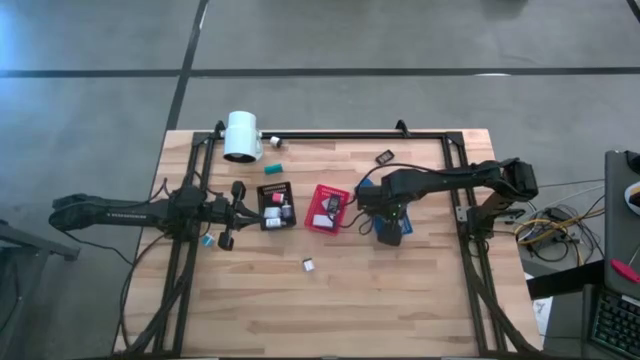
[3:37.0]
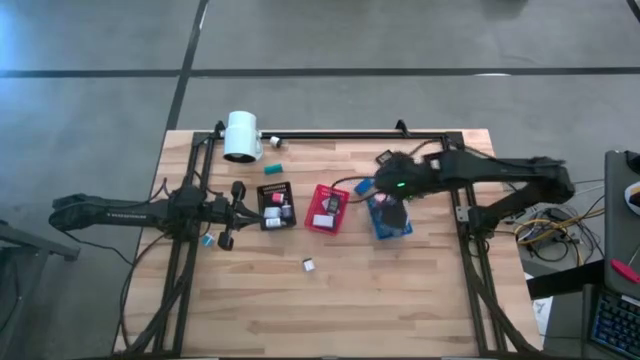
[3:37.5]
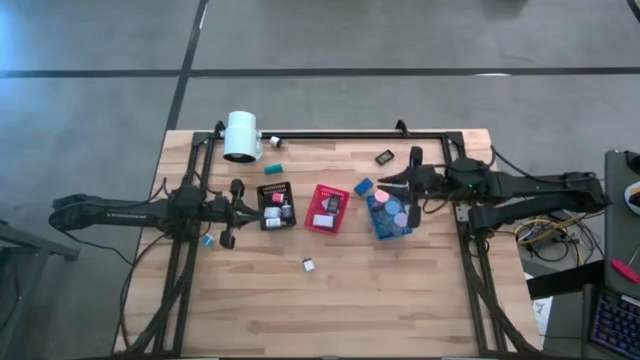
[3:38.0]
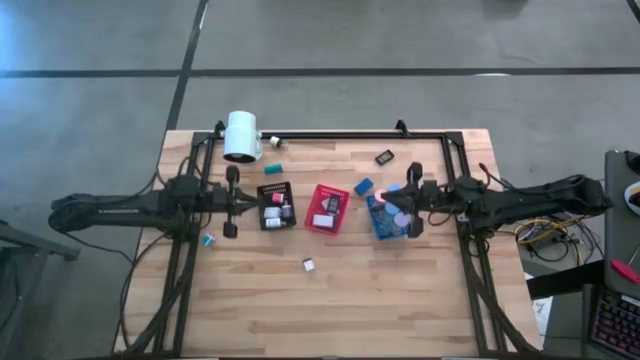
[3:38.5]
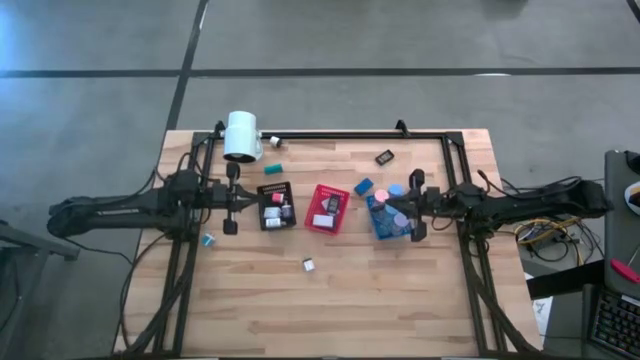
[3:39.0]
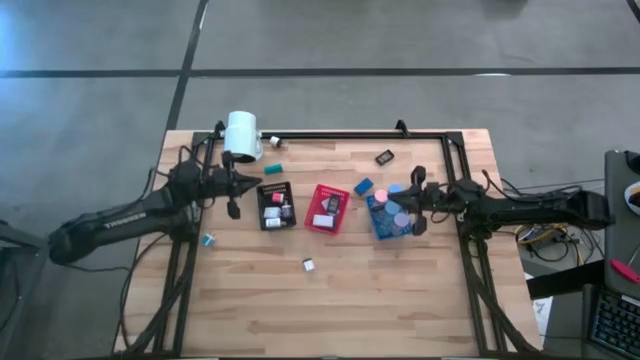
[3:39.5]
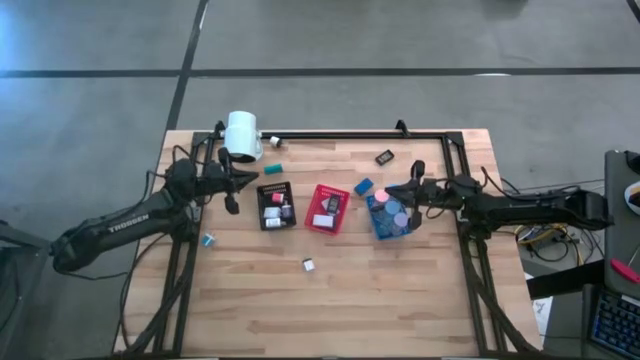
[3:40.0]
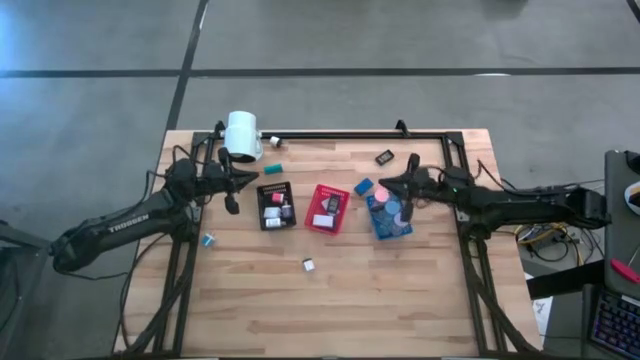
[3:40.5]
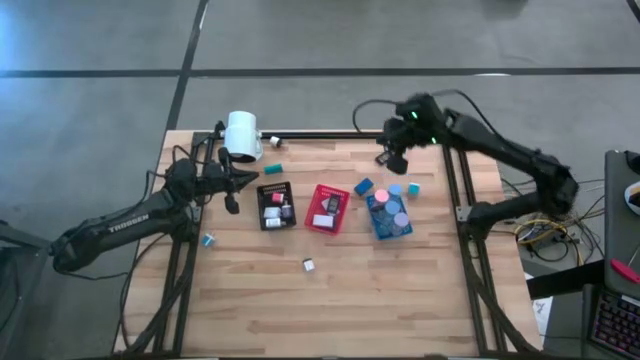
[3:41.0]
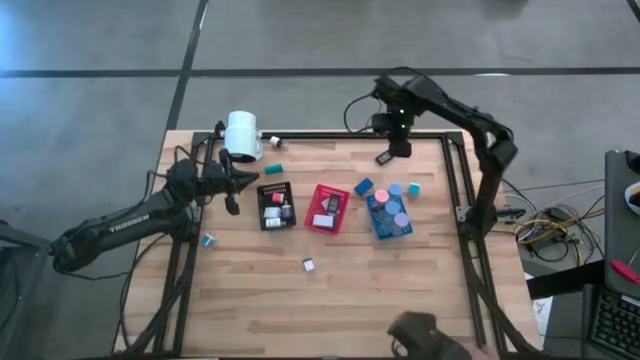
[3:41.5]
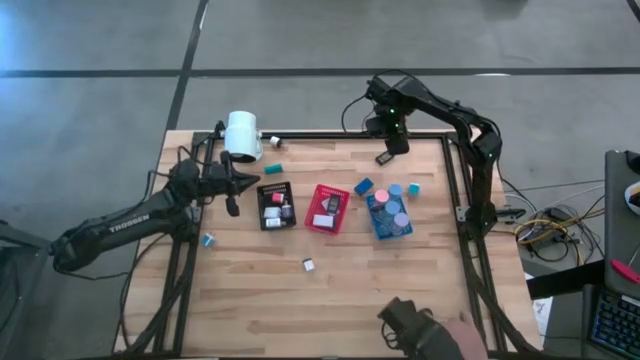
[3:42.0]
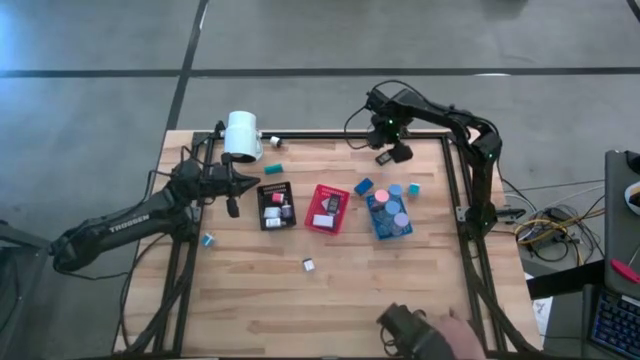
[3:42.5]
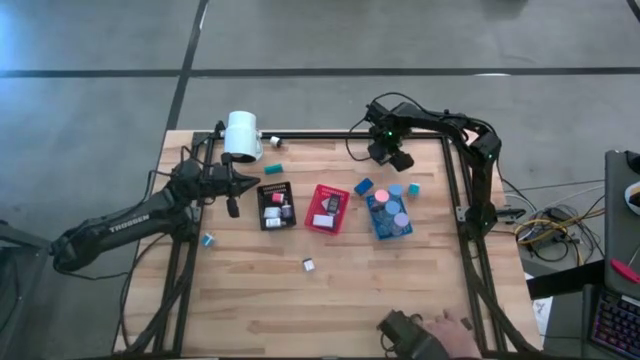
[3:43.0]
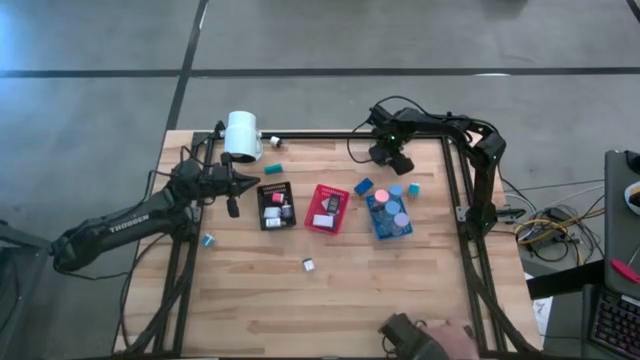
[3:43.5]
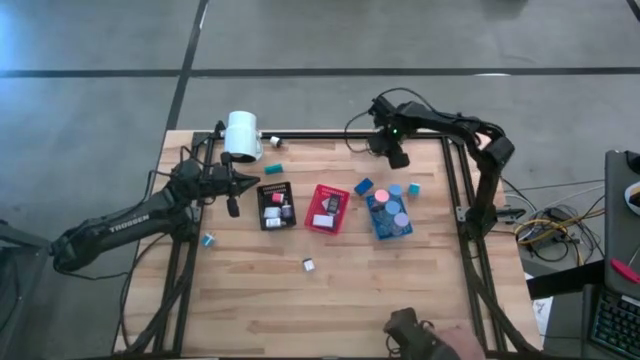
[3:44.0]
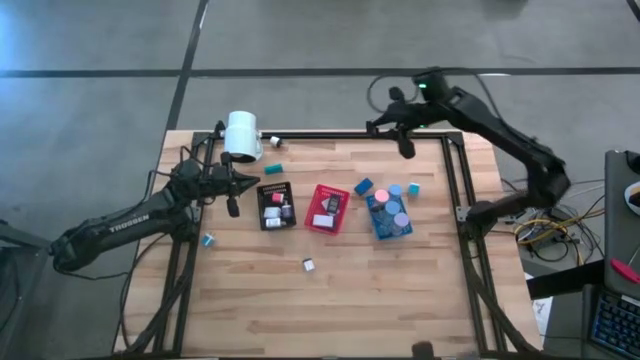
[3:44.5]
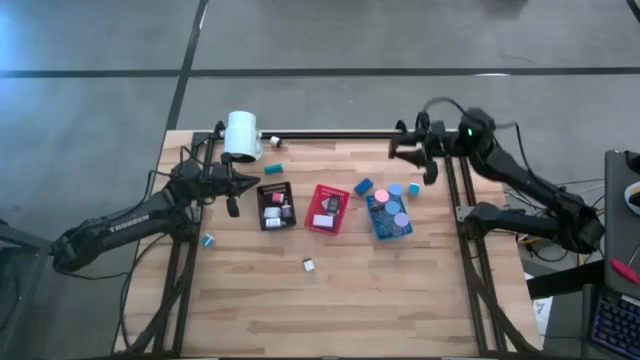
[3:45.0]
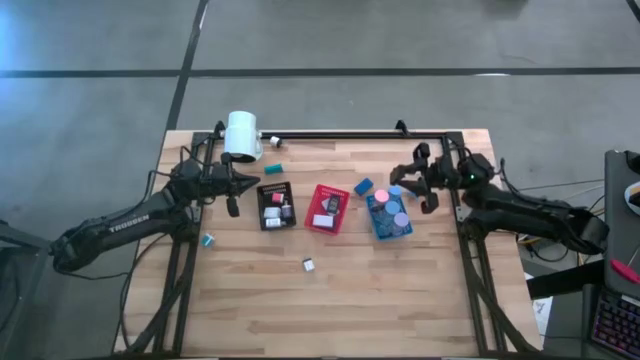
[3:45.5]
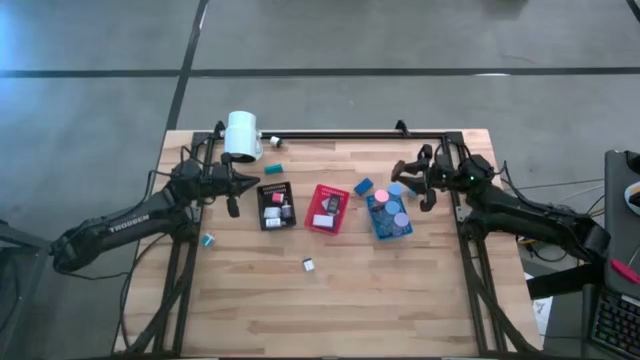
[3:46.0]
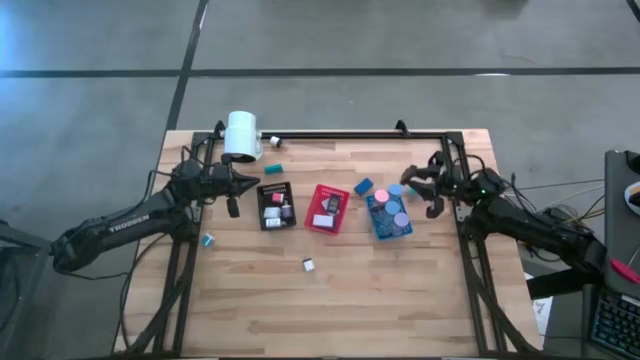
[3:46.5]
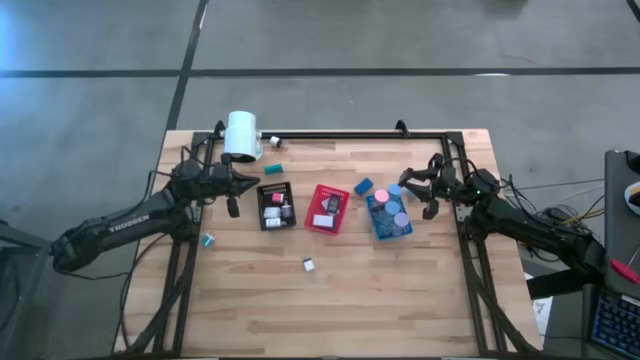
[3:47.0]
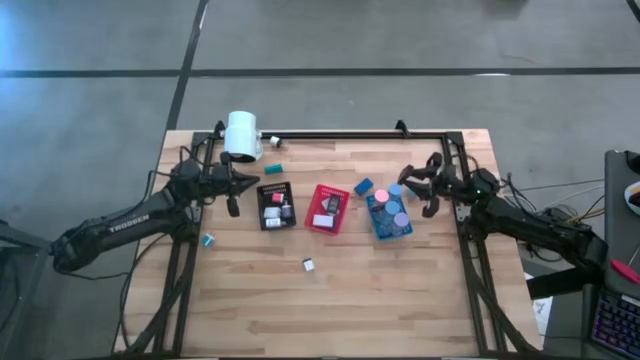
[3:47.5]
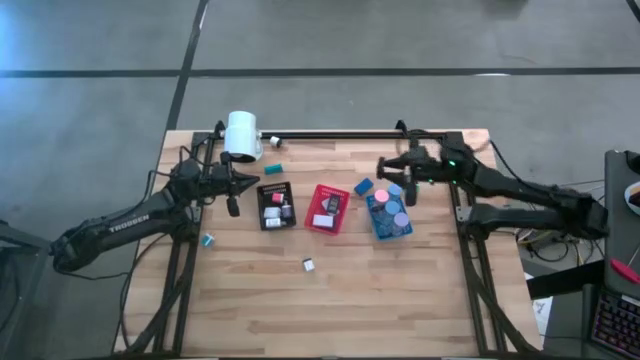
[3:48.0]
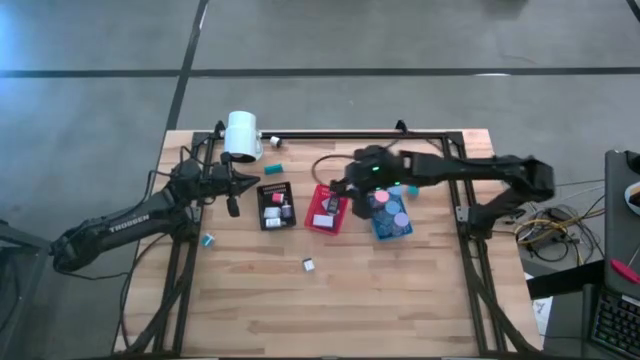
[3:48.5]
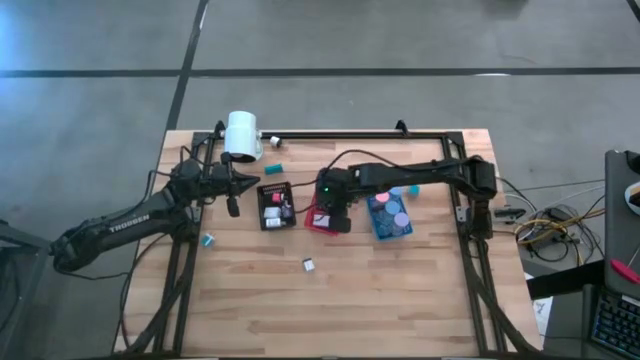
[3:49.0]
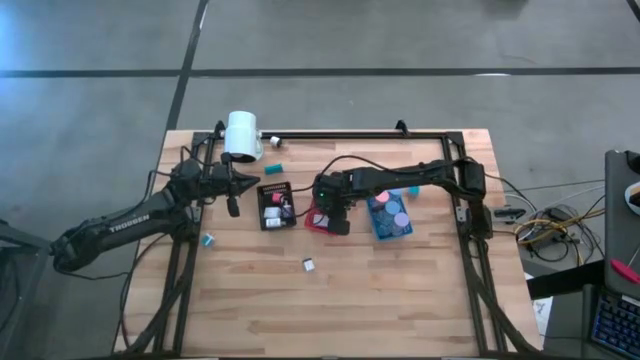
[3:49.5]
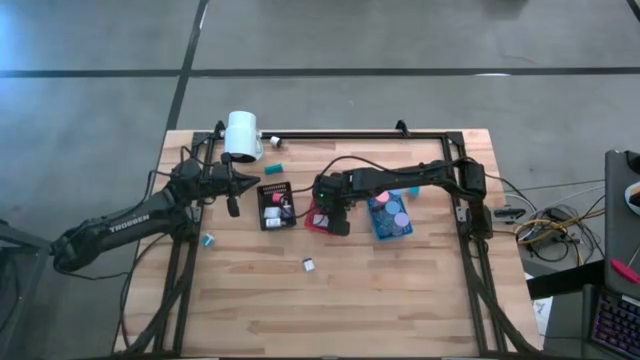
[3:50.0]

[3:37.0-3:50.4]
Task: Pick & Place Office items
Put the black digital clock into the red bin

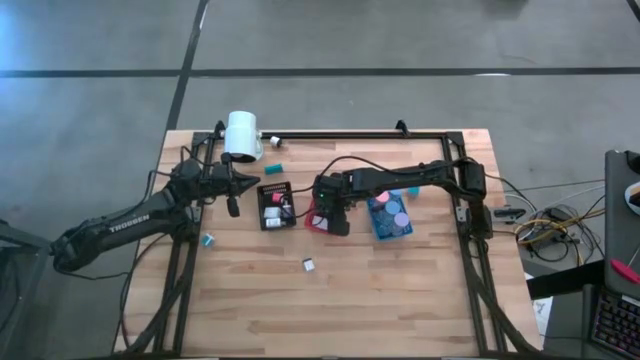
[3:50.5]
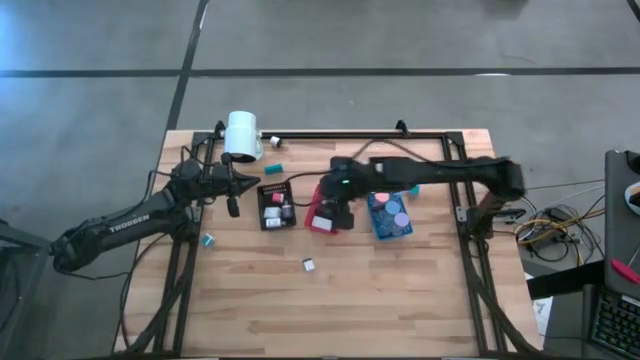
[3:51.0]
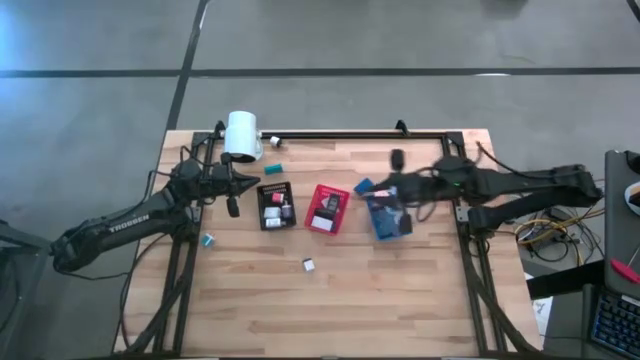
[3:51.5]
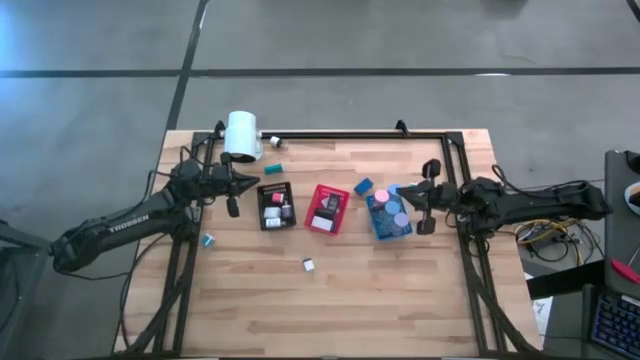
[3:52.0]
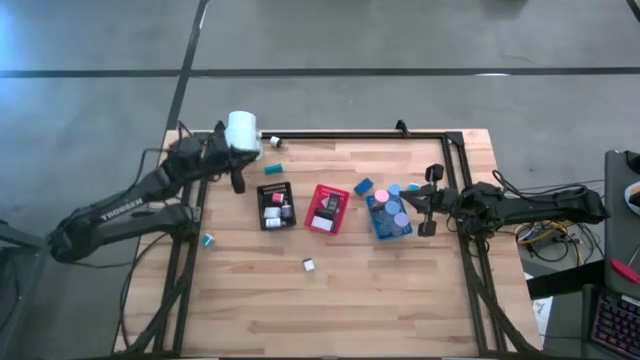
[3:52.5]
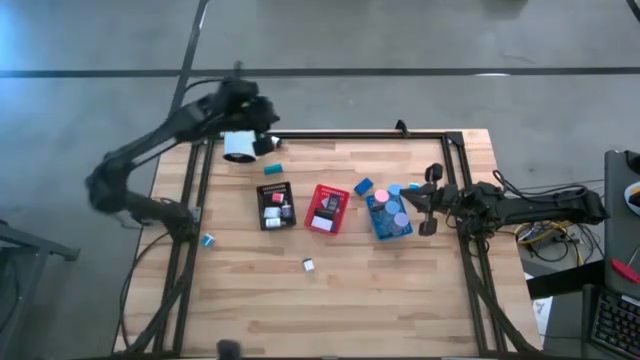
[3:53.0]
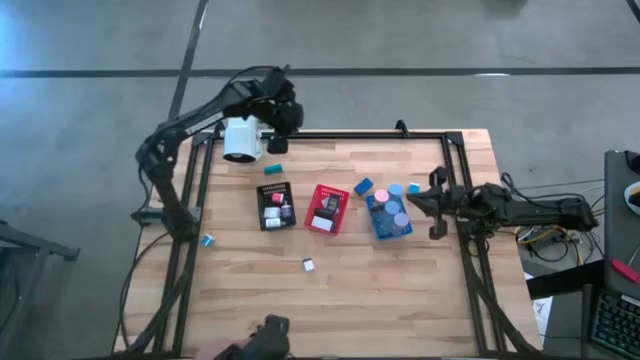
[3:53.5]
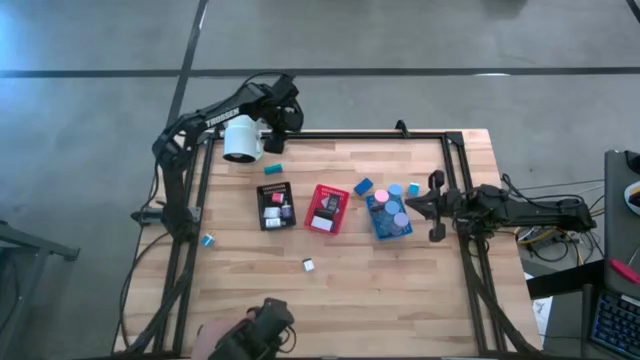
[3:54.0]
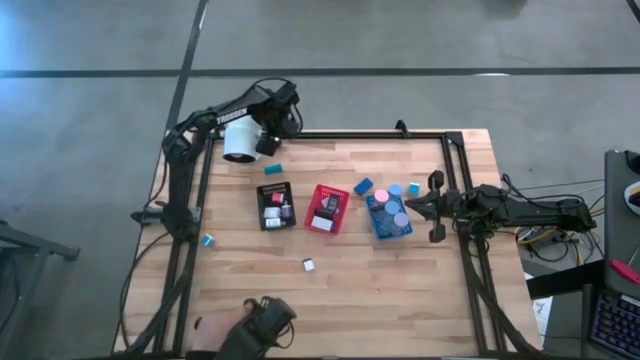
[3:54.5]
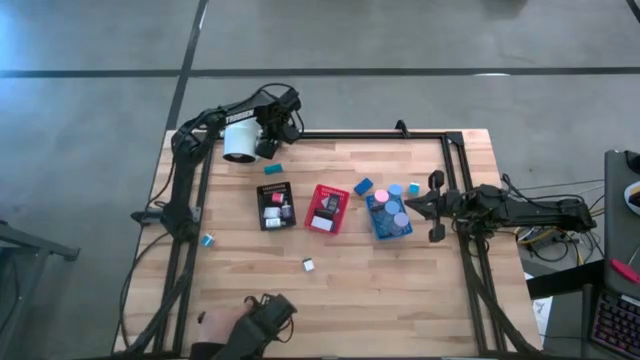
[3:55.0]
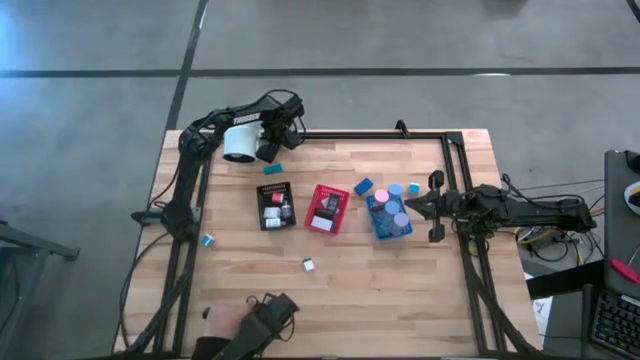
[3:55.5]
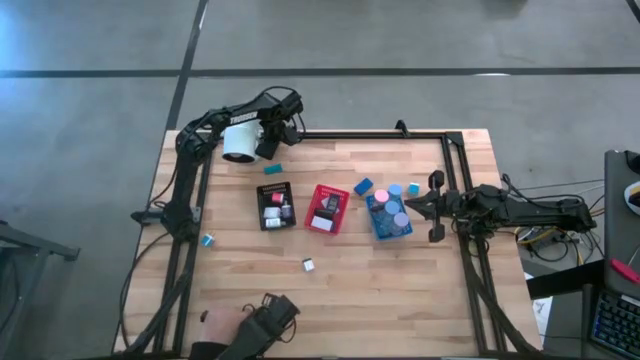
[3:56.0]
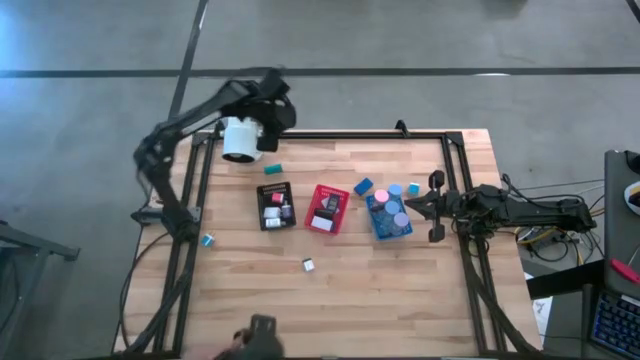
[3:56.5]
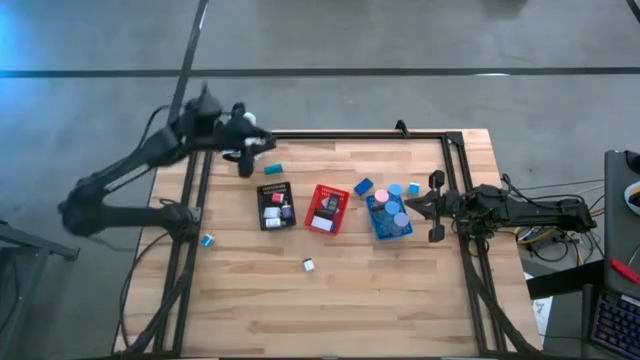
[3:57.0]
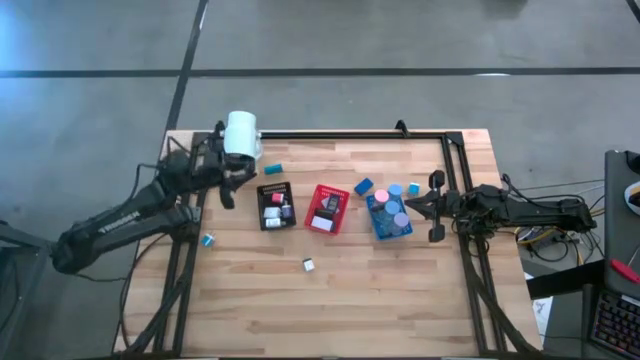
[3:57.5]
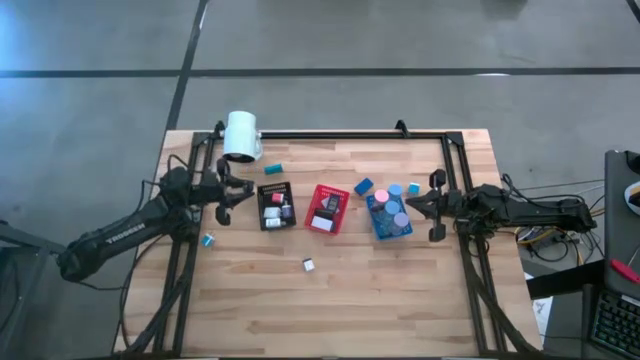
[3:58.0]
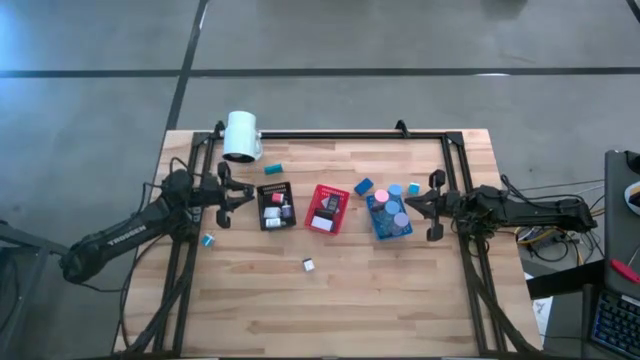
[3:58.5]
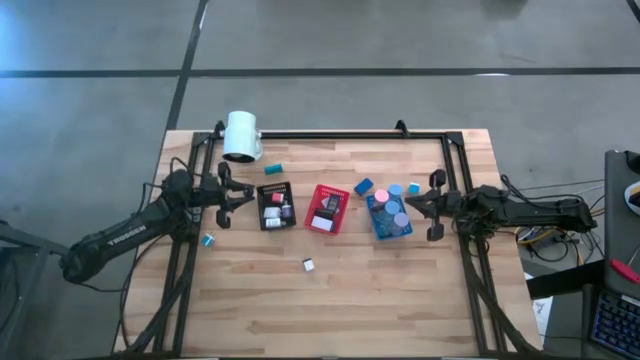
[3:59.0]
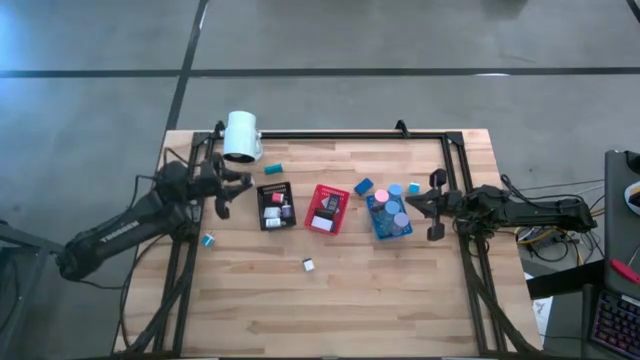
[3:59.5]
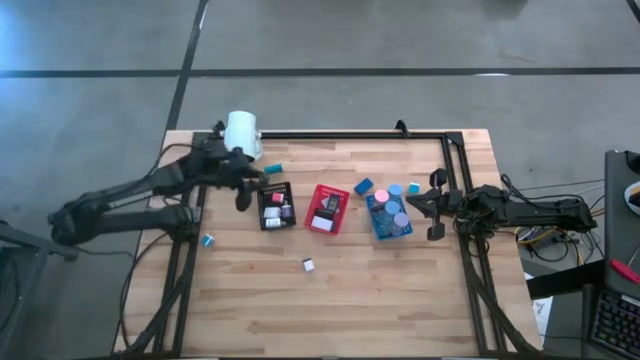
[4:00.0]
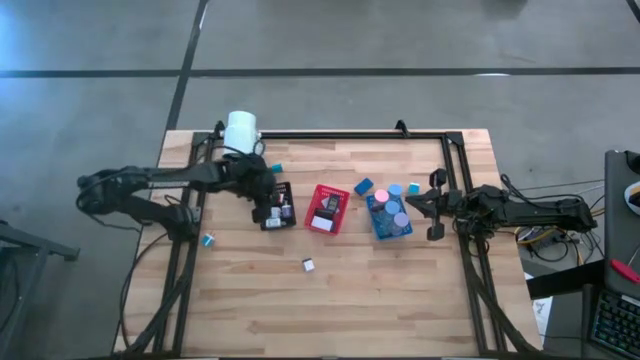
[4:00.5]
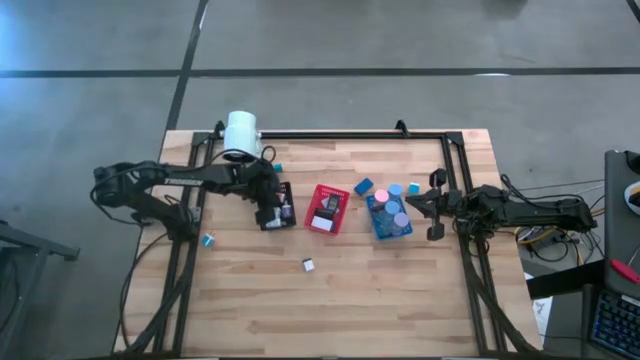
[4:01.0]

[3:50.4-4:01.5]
Put the top black charger adapter into the black bin
